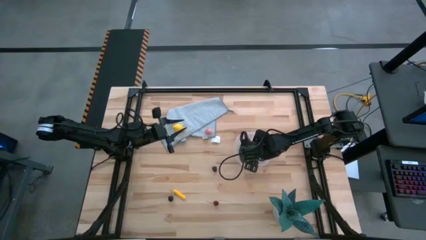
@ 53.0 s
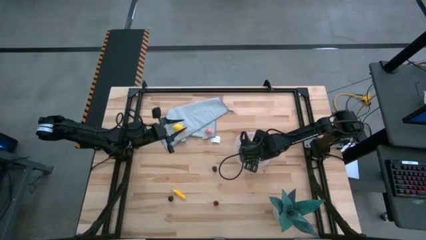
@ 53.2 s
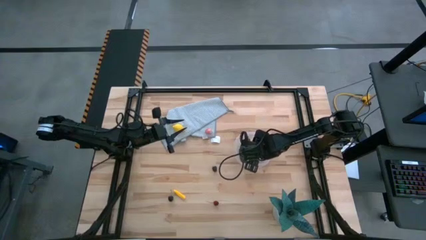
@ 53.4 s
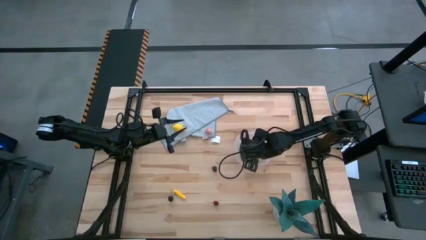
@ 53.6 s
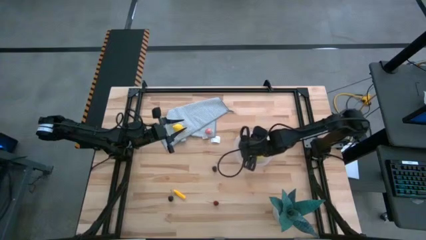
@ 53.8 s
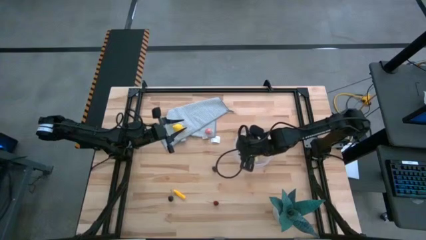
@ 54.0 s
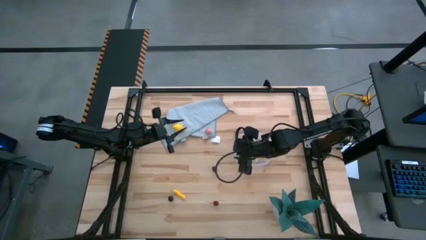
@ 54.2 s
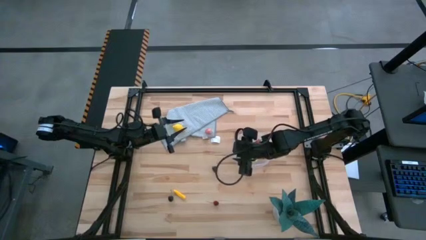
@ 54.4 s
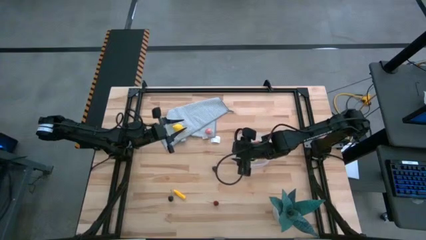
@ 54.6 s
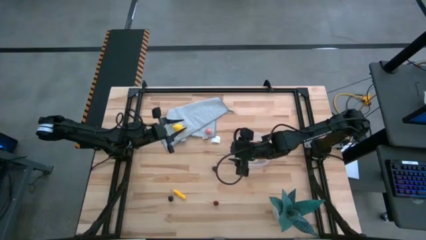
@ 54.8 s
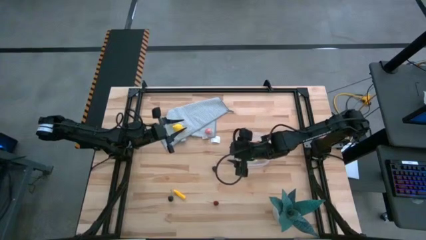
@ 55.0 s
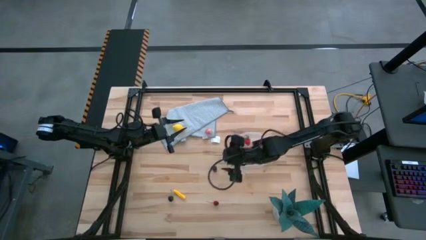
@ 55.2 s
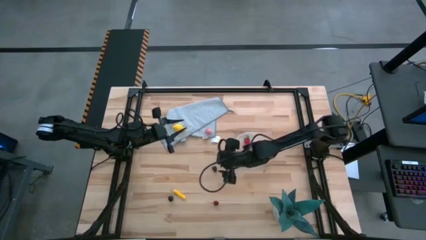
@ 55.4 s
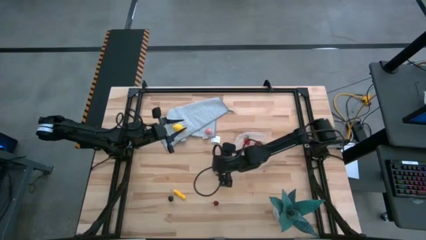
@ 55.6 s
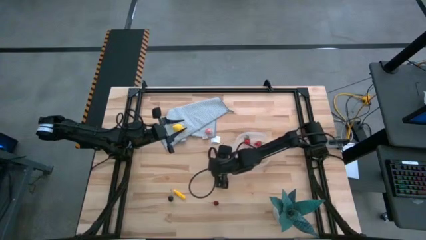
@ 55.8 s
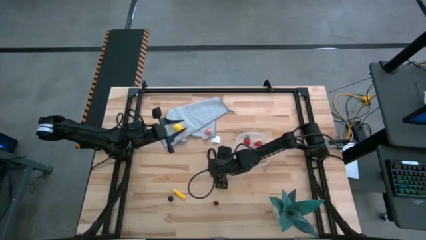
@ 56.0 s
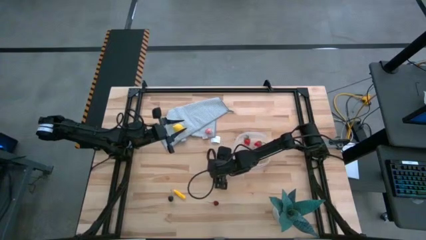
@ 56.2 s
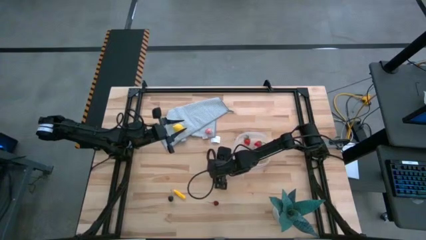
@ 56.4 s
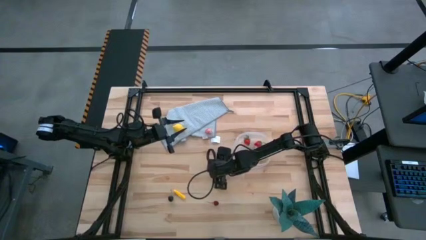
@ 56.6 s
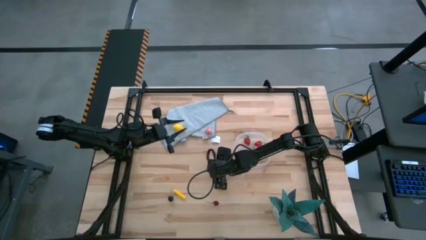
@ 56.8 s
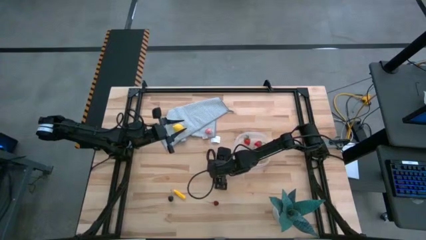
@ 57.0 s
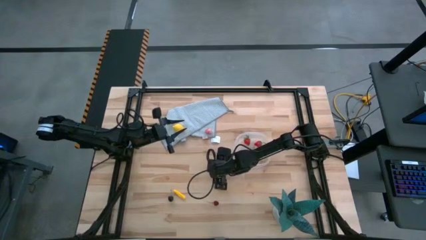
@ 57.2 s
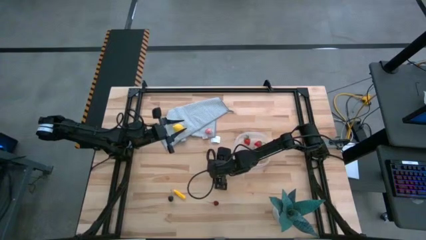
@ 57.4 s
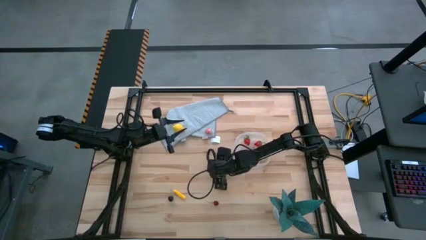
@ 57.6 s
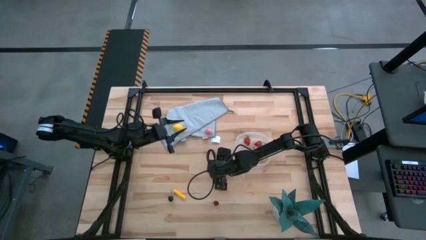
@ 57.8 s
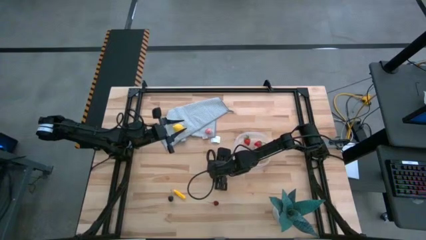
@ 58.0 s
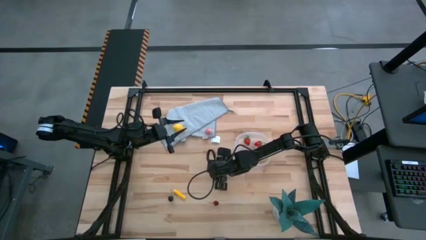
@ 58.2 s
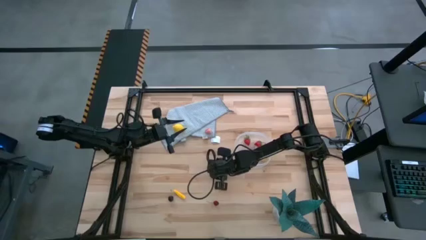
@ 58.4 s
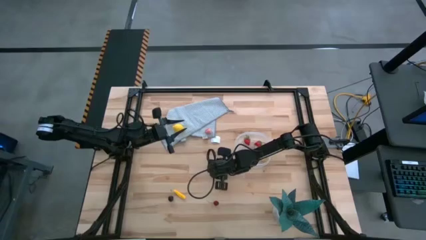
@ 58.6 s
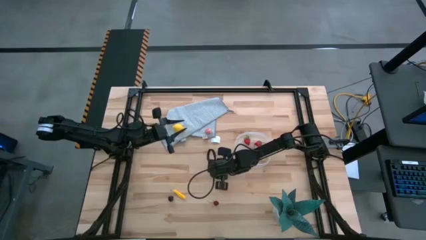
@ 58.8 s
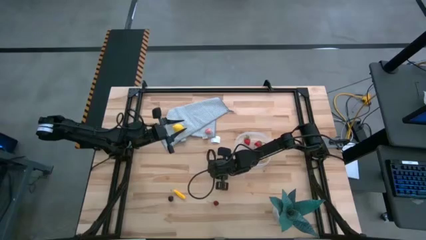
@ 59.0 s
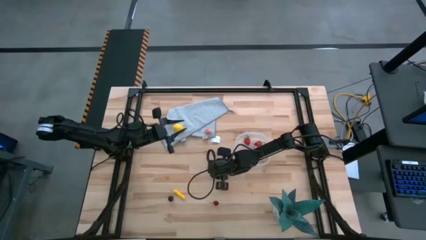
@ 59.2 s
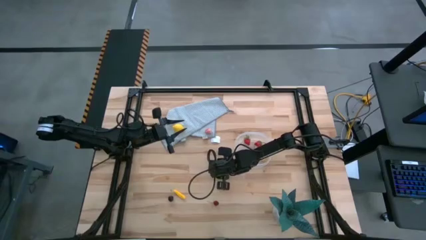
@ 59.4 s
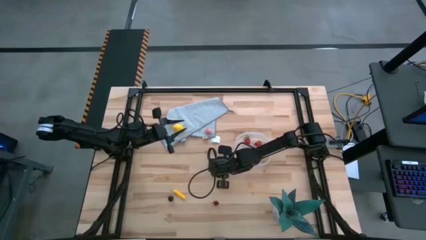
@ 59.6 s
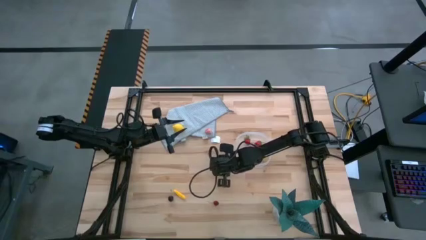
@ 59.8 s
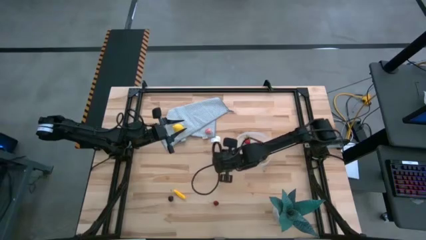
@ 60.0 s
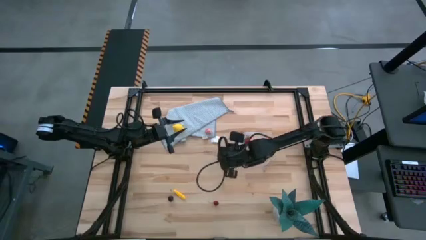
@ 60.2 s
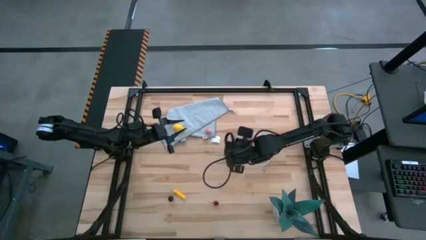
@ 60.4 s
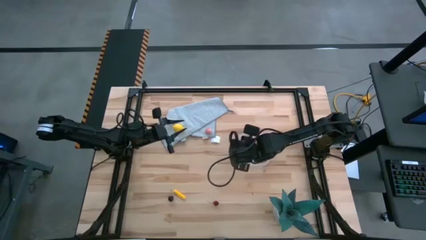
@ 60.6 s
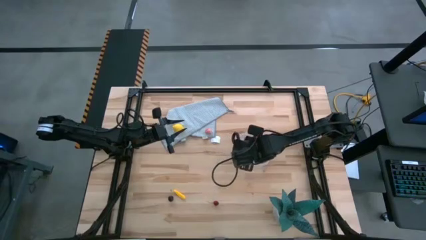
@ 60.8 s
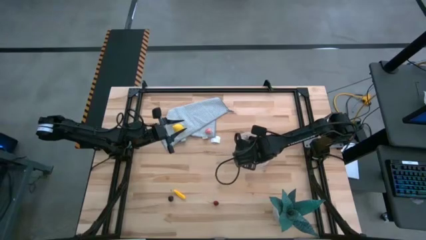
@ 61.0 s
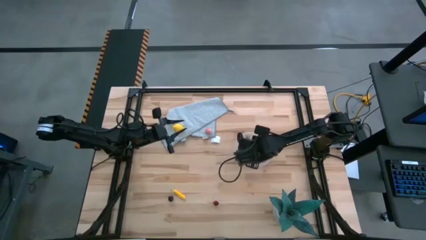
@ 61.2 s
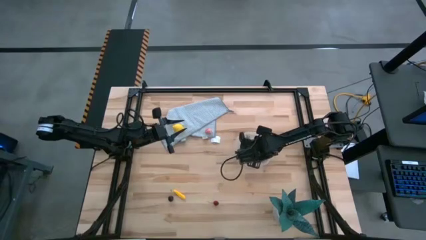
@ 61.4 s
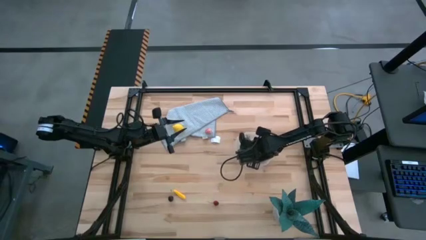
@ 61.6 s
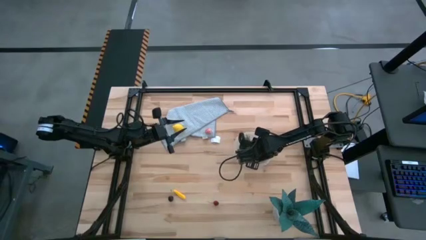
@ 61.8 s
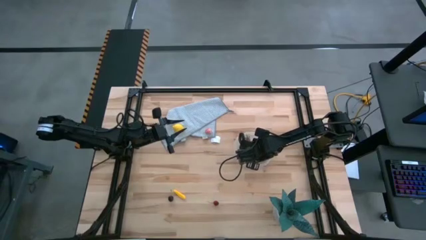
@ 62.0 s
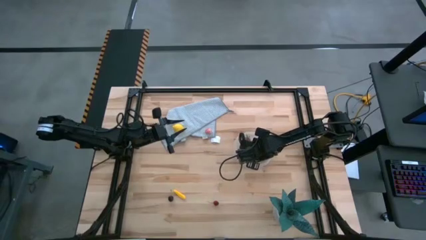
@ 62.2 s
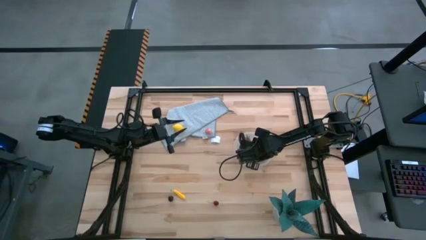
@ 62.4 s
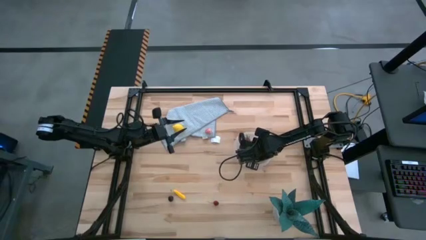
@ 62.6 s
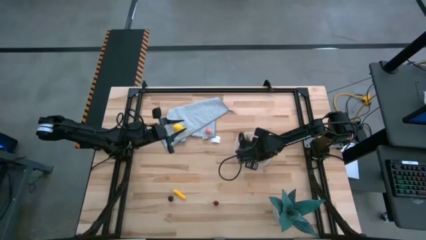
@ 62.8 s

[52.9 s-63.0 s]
Task: Pick and placing Produce into tupperware
Put the blackberry into the transparent container
